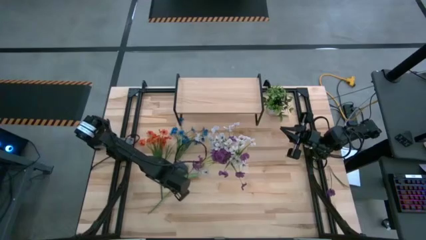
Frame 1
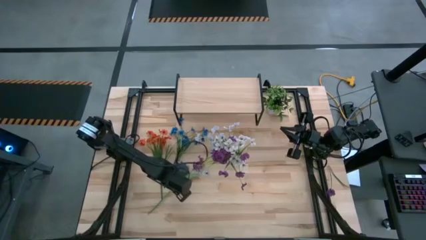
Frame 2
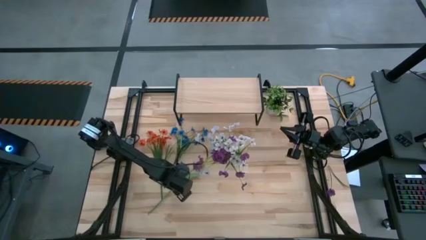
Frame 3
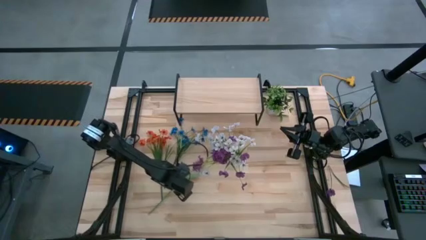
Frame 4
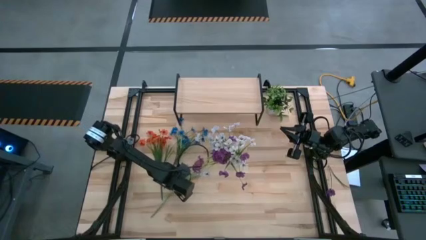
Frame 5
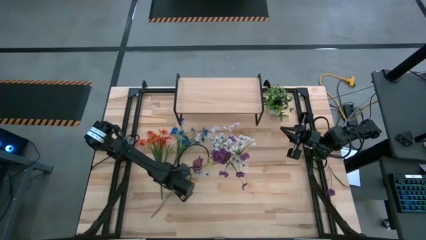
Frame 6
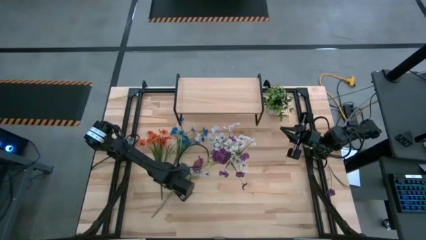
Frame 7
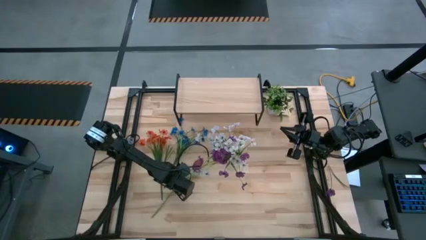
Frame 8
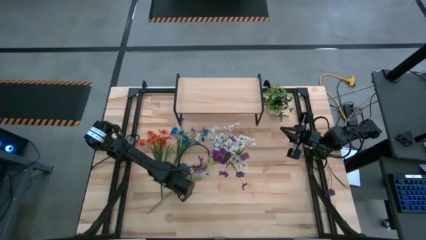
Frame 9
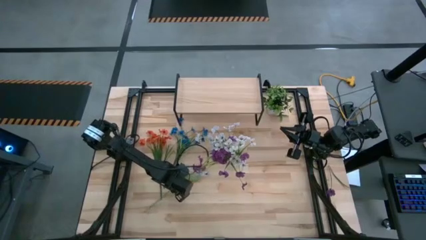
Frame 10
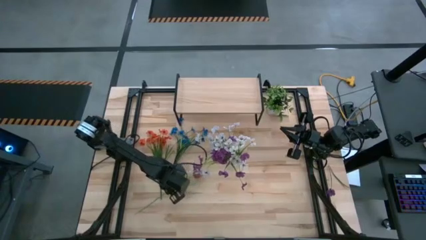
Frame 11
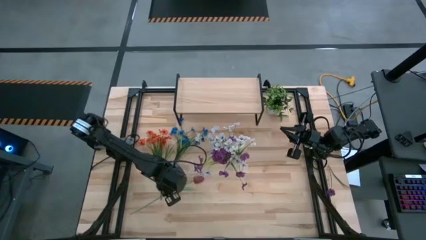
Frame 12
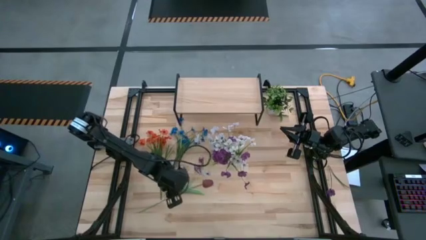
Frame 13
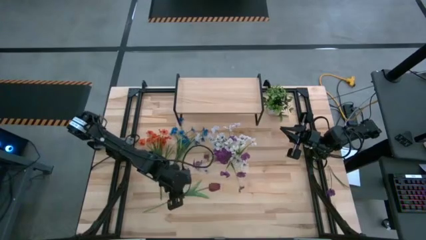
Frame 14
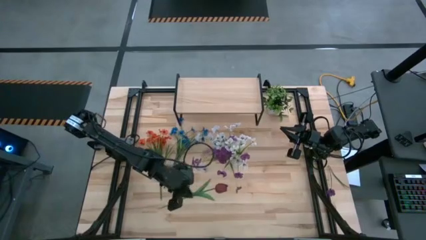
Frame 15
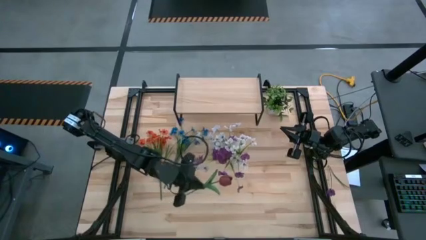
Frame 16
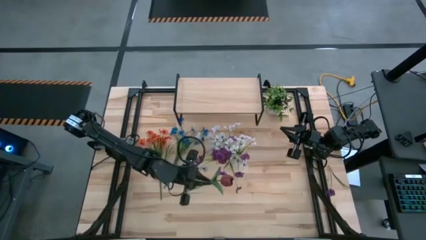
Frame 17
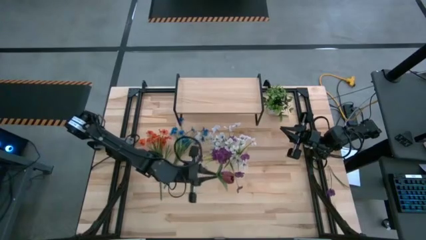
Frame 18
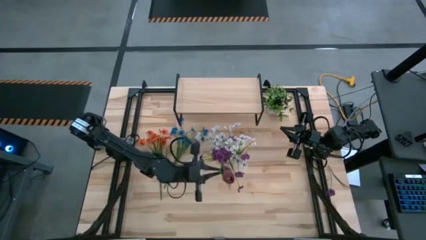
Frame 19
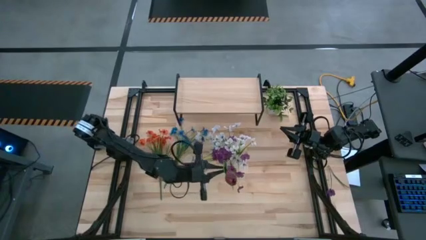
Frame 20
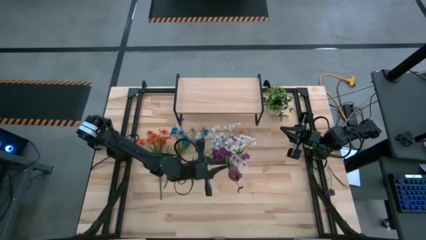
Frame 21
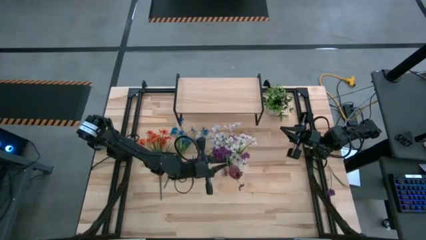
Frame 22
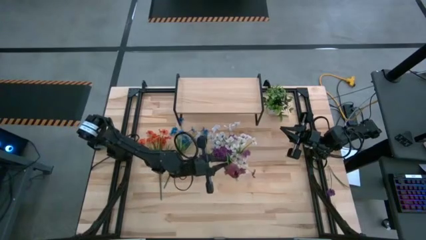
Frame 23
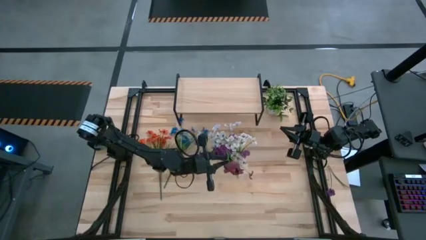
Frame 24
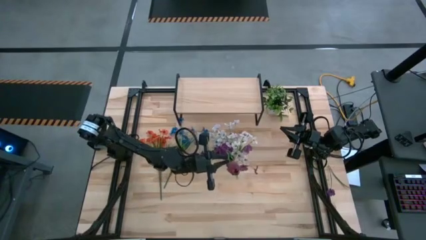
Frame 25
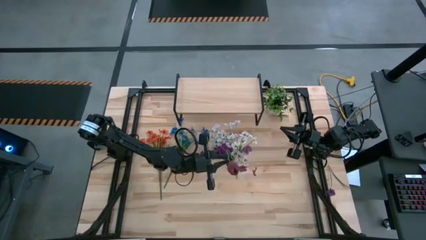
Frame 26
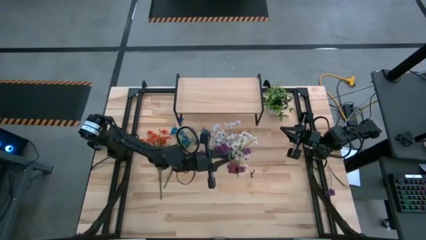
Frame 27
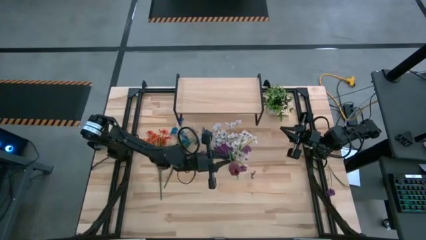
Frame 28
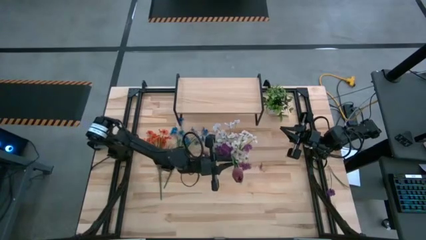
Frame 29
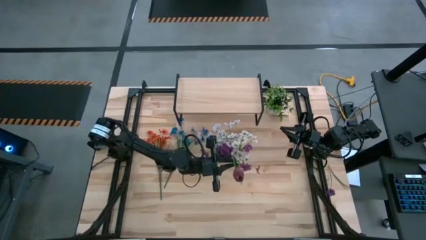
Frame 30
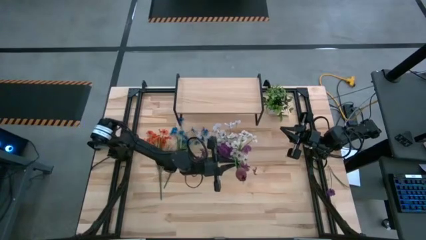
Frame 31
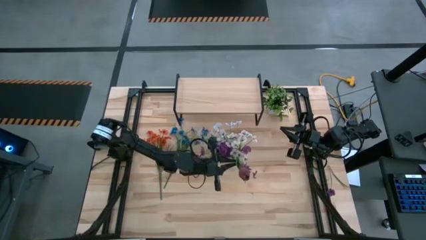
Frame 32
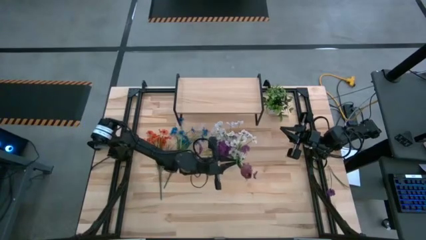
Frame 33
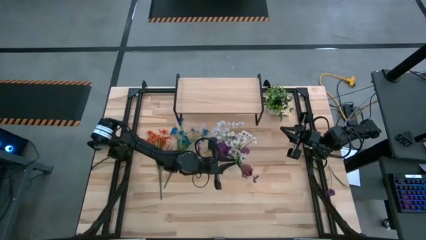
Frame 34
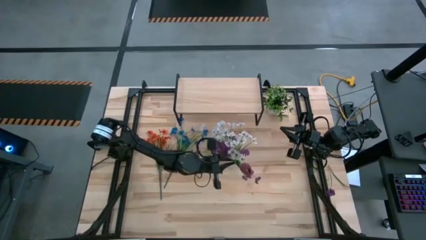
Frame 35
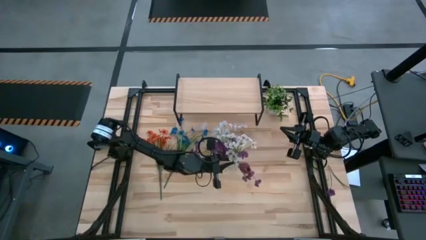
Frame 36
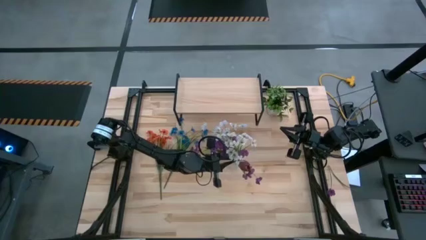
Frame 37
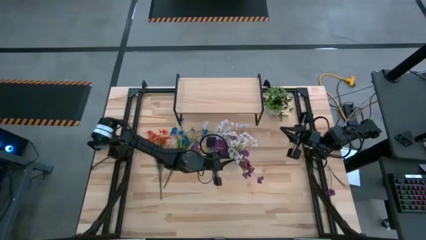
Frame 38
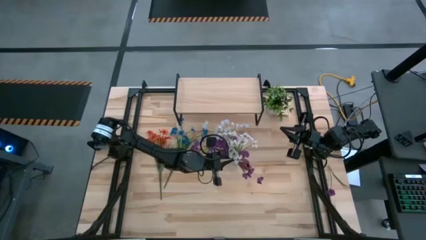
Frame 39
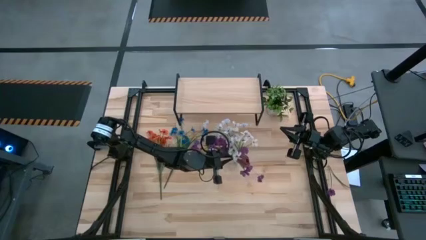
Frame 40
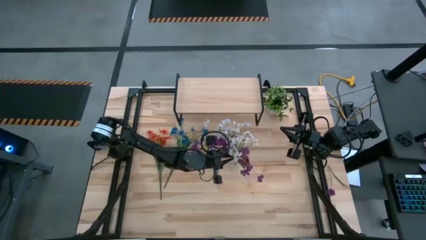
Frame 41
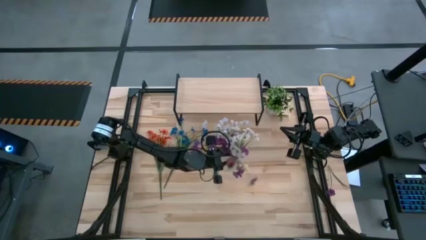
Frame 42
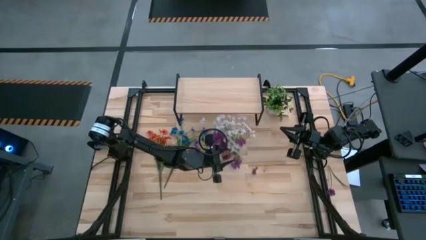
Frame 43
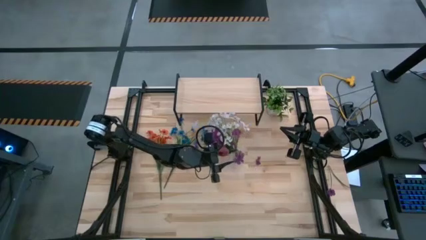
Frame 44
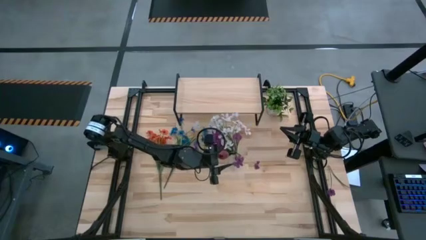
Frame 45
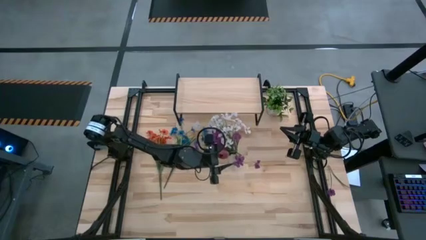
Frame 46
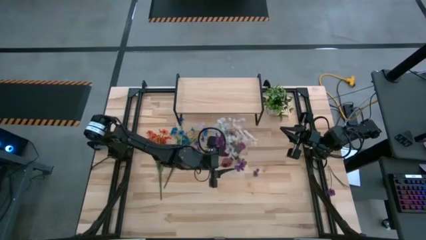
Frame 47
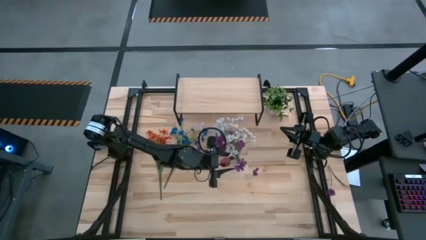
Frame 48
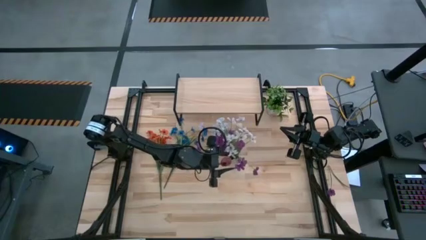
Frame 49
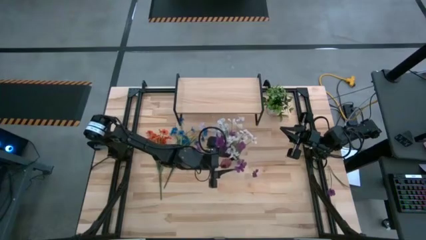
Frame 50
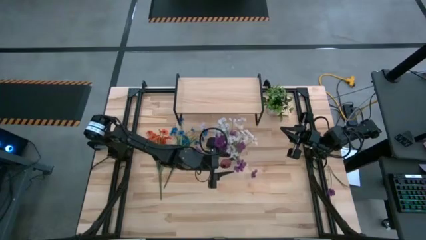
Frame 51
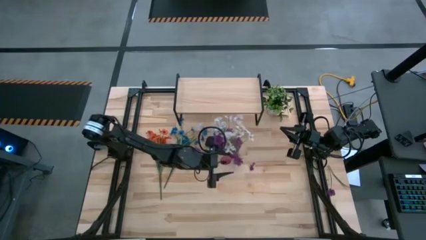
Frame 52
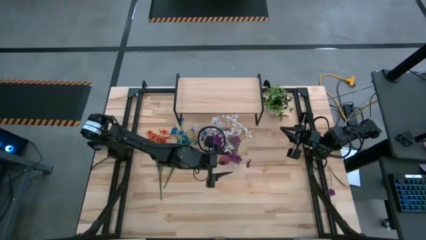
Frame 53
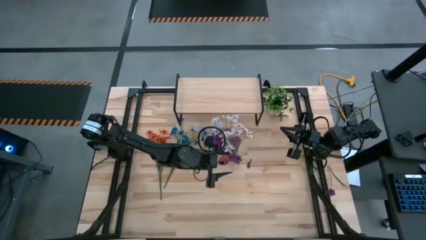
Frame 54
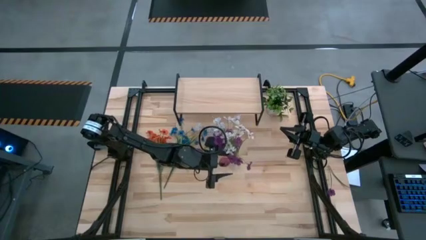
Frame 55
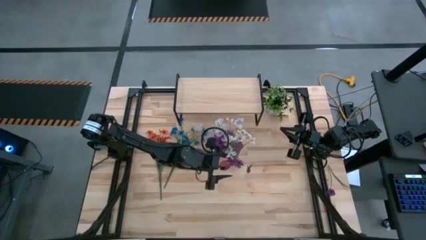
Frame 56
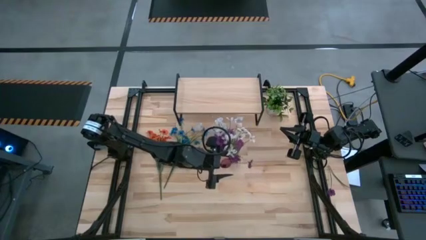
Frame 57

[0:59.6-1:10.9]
Task: Pick and place flowers into a vace then onto a shelf
Put the red flower into the transparent vase

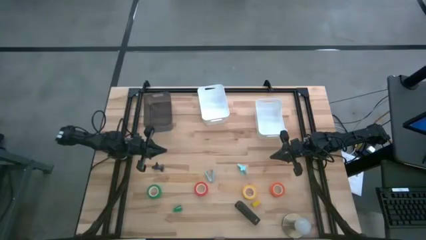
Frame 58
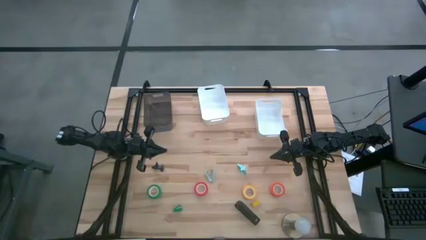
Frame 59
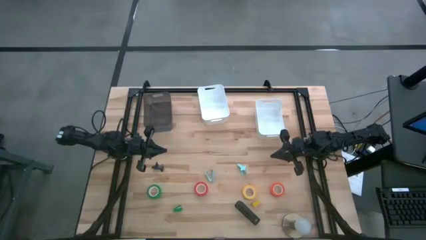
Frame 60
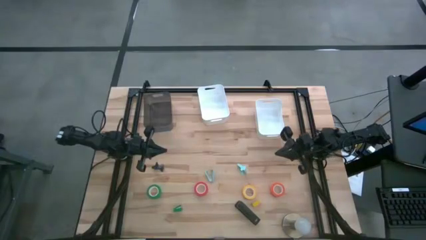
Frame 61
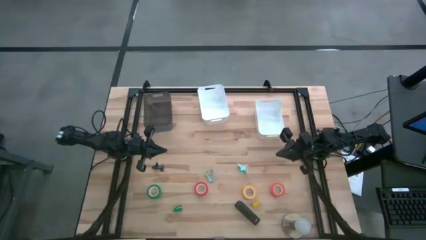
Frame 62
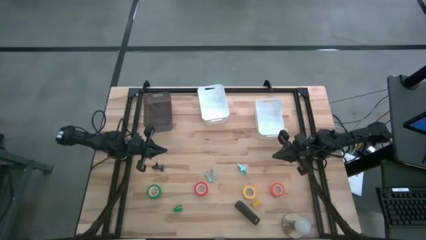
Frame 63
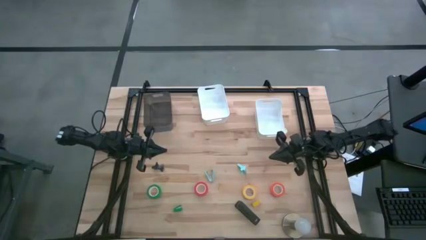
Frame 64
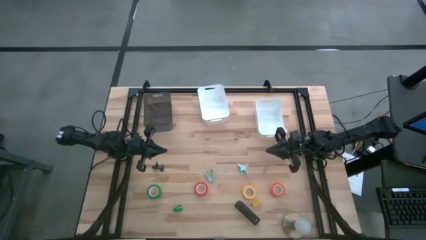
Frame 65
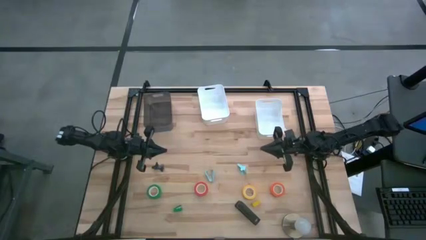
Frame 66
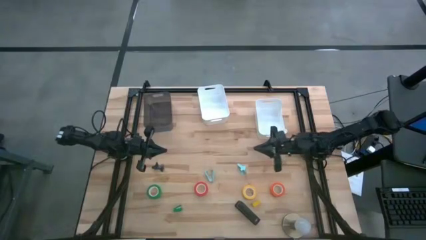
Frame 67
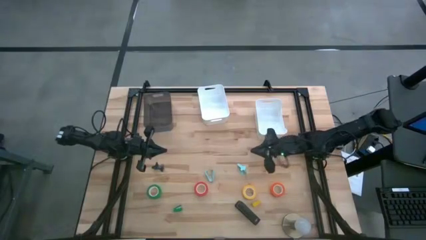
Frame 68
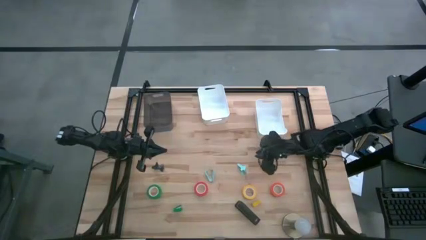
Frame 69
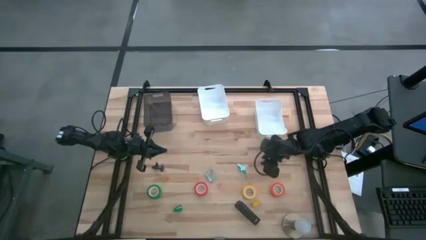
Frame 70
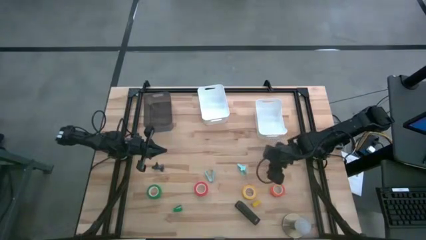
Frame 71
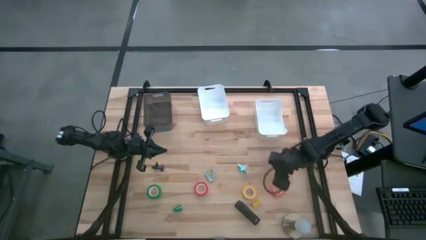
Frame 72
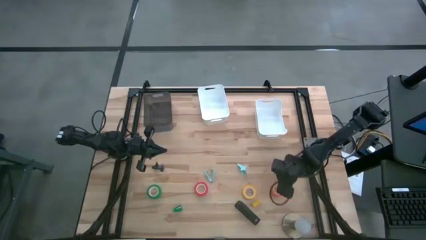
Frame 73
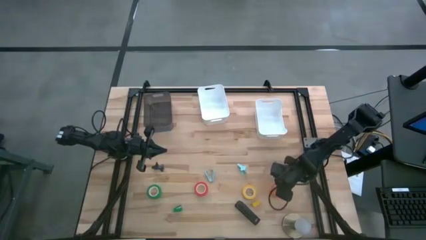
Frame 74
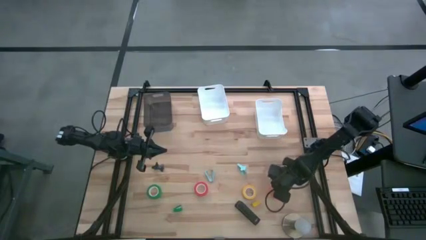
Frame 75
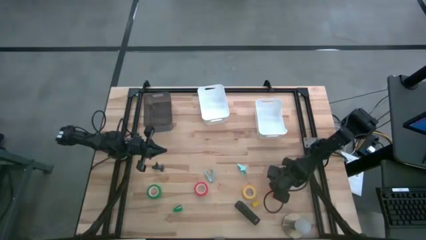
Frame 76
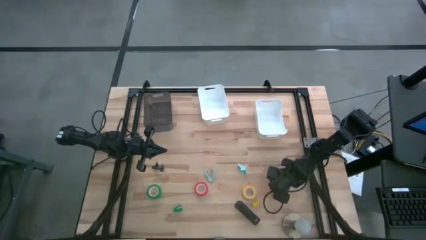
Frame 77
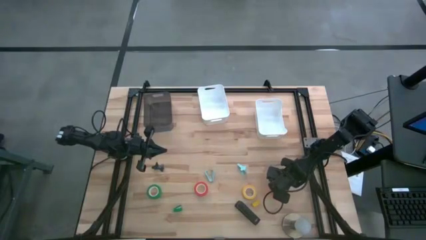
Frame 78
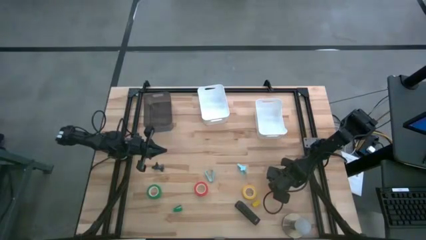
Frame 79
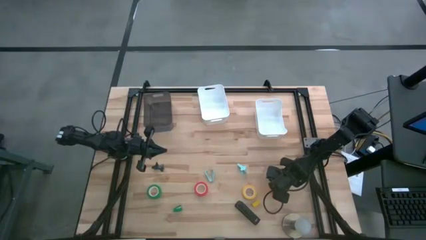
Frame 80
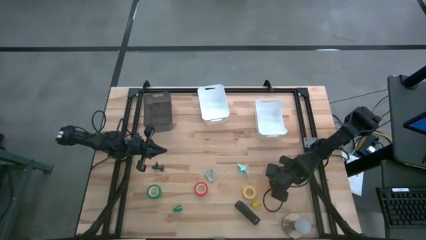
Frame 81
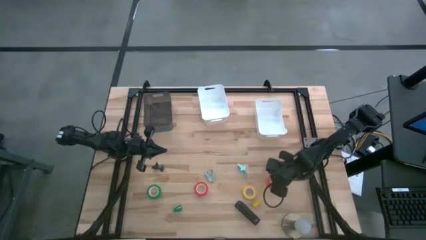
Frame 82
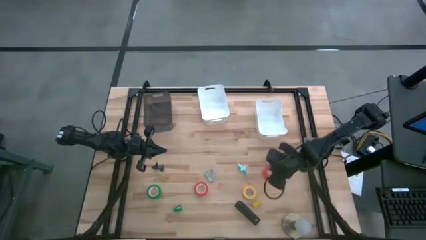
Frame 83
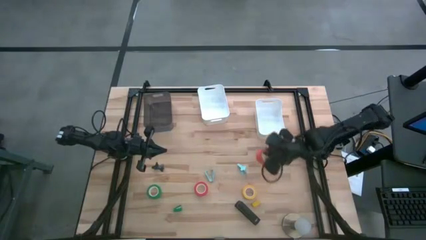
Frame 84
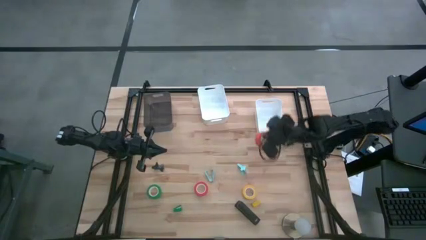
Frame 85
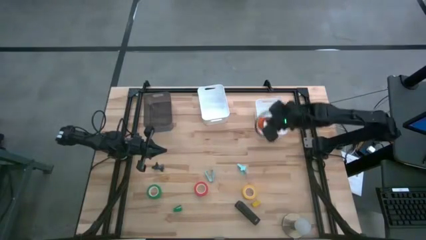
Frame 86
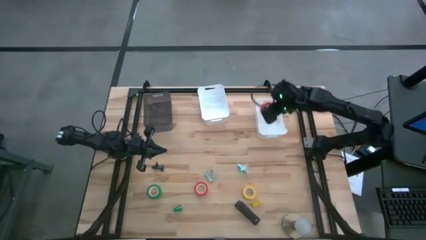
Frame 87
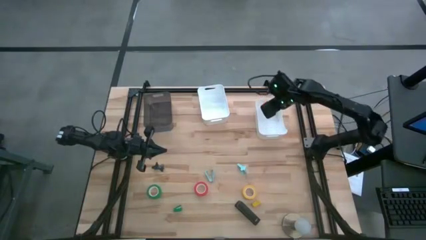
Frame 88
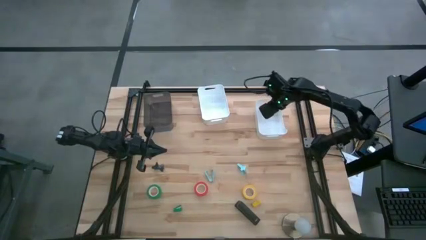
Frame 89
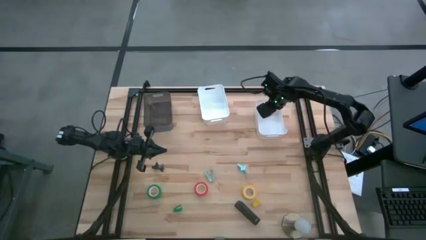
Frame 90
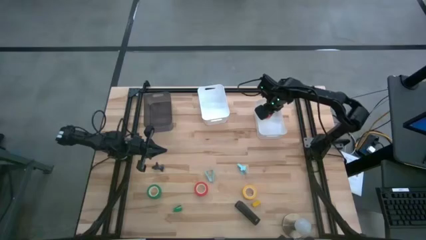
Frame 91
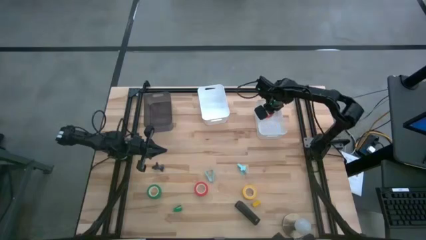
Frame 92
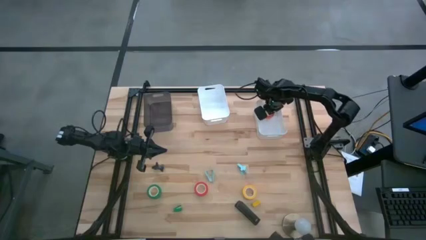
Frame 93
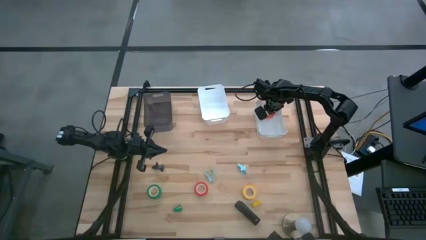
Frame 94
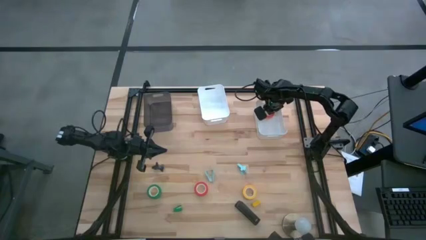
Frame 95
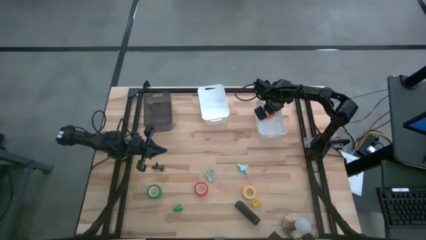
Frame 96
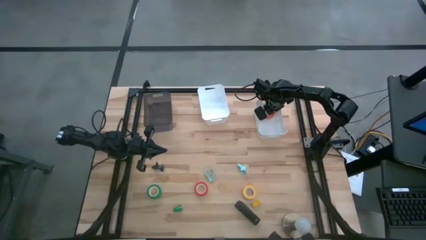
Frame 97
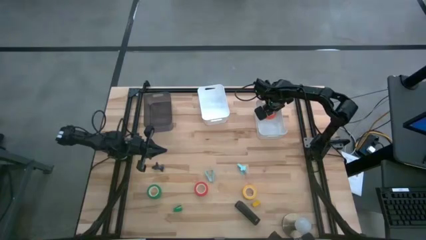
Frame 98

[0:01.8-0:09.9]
Task: Pick and place Stapler, Stapler remover, tape
Put the orange tape into the right white bin
